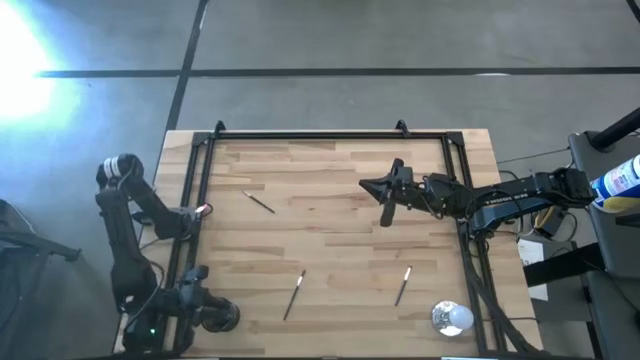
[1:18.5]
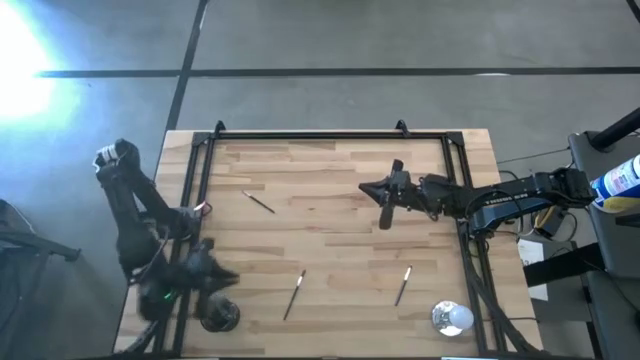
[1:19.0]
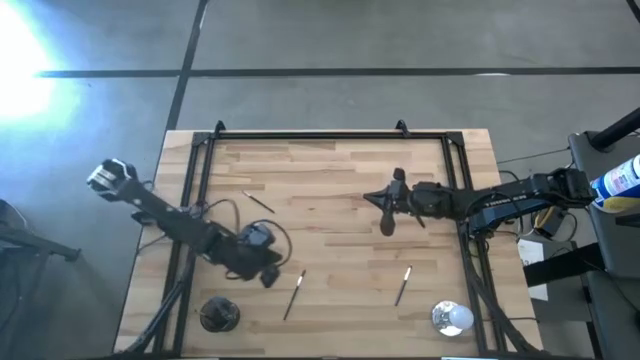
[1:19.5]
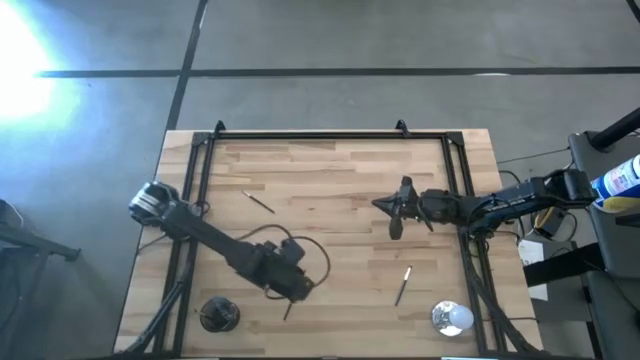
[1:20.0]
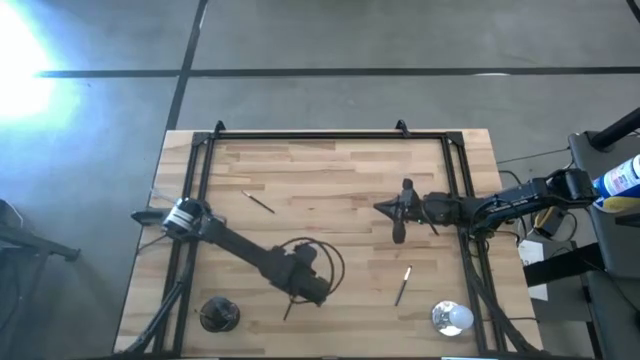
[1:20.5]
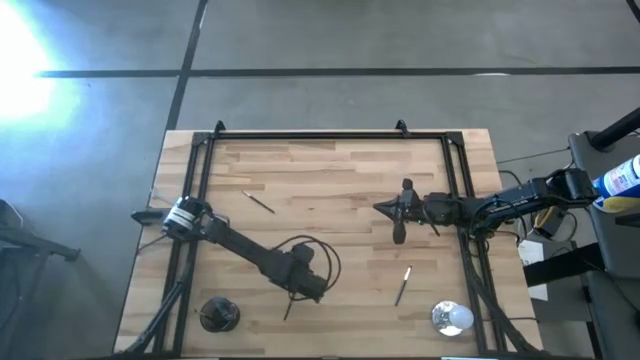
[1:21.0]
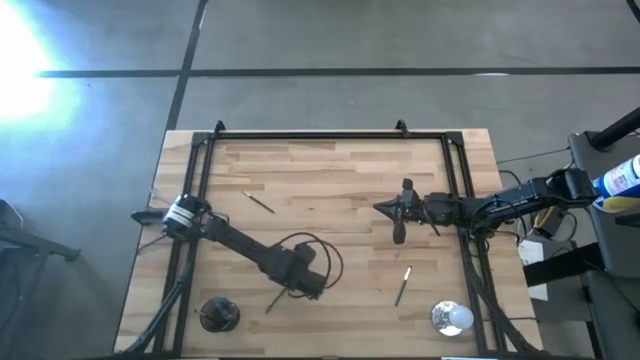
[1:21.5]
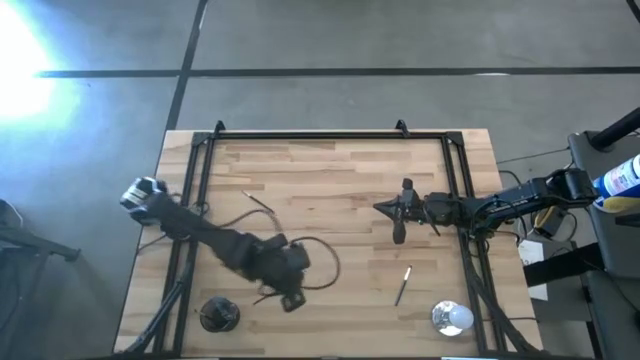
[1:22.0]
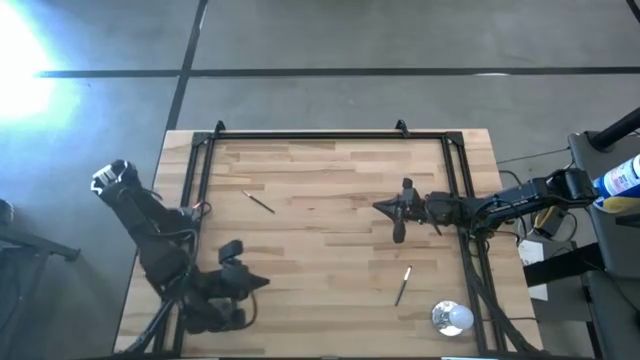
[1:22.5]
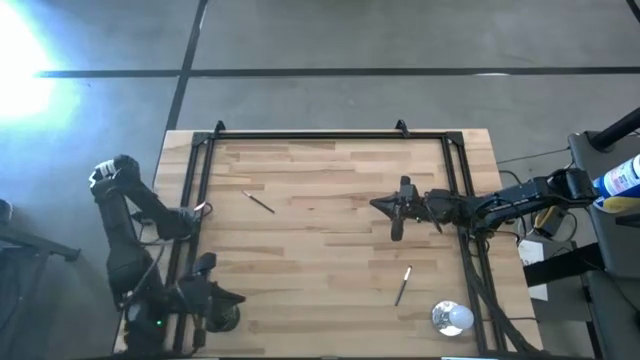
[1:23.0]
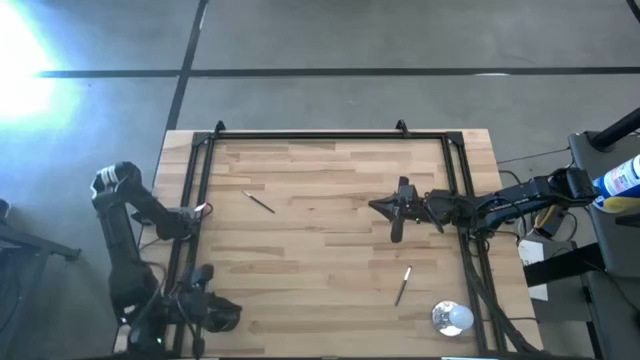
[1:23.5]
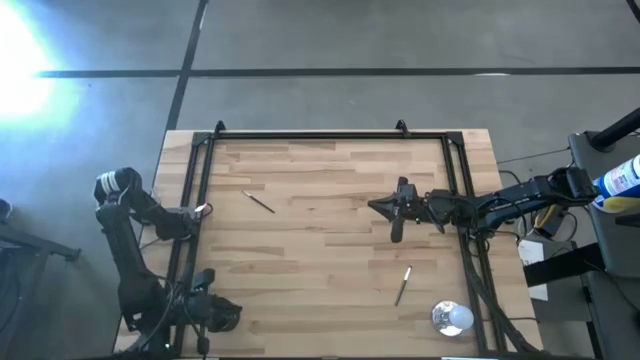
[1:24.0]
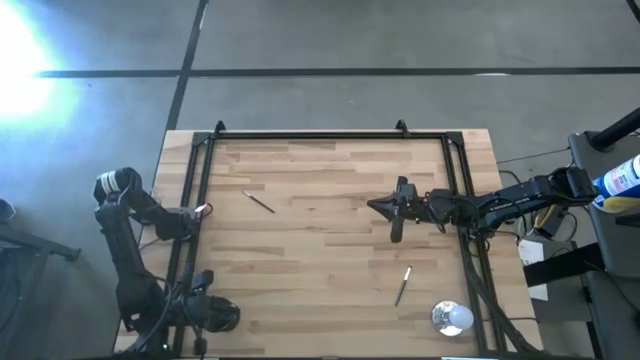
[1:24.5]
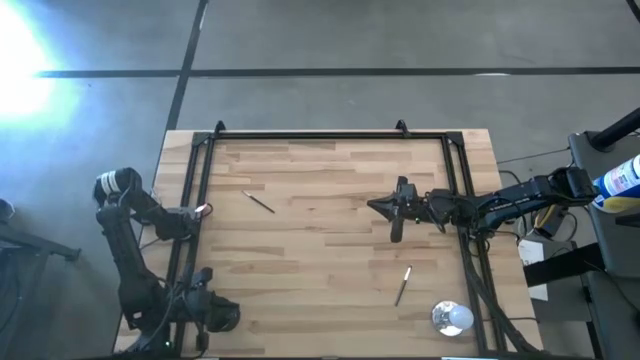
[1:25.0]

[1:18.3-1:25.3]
Task: Pick & Place Makeup Brushes
Put the black brow brush into the makeup holder

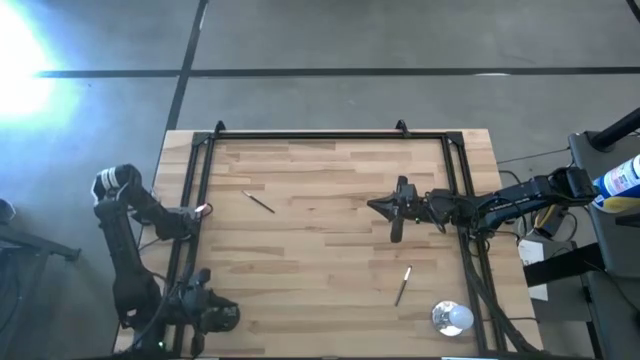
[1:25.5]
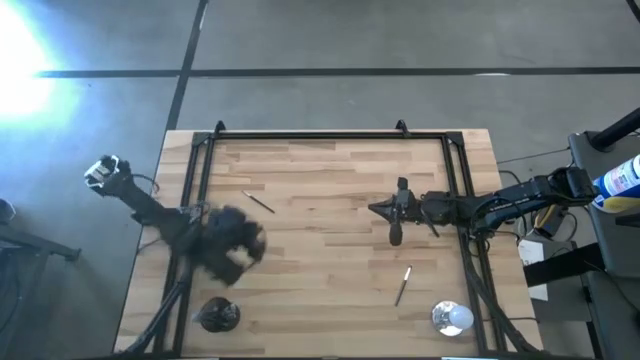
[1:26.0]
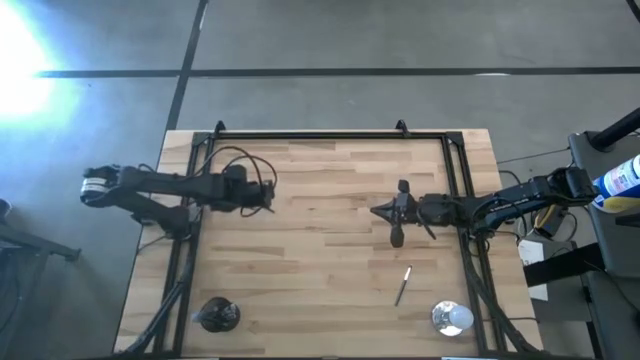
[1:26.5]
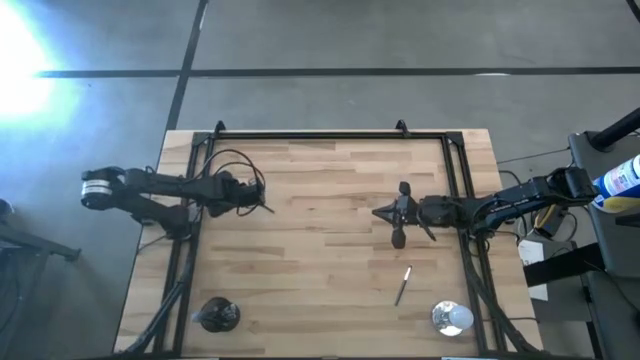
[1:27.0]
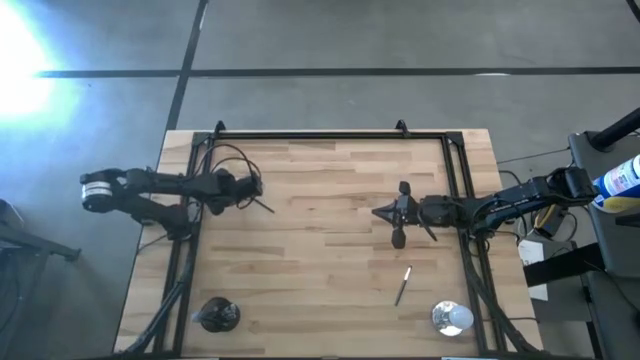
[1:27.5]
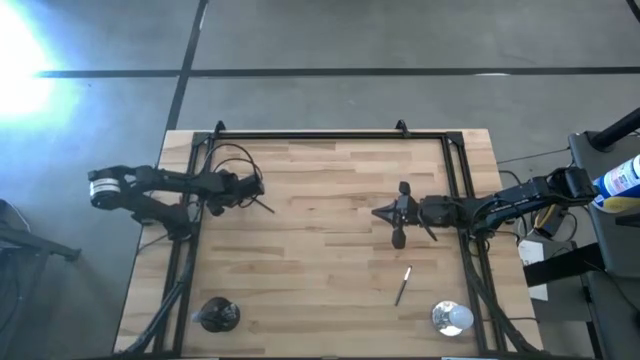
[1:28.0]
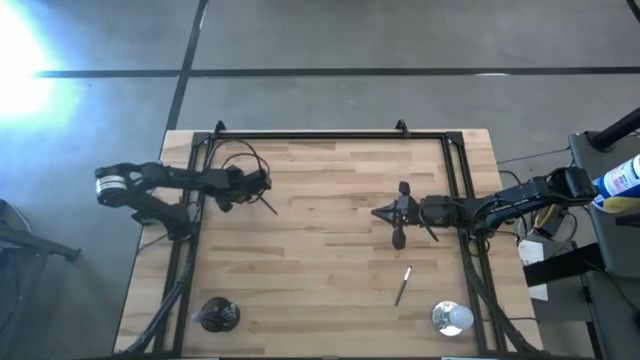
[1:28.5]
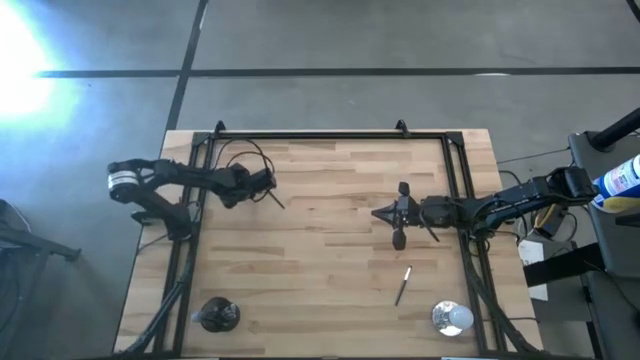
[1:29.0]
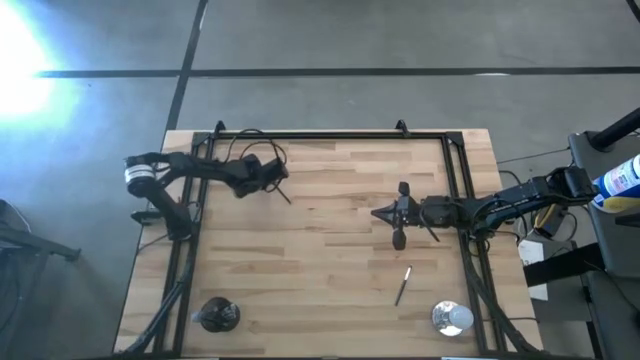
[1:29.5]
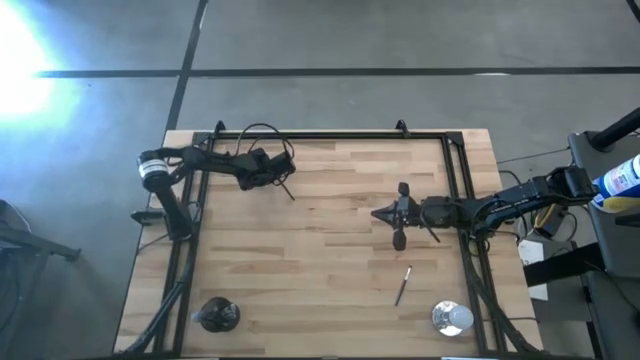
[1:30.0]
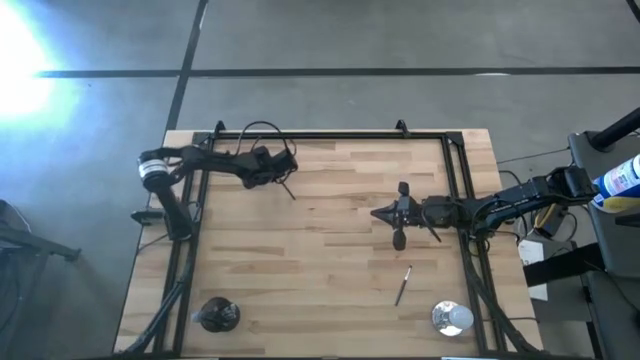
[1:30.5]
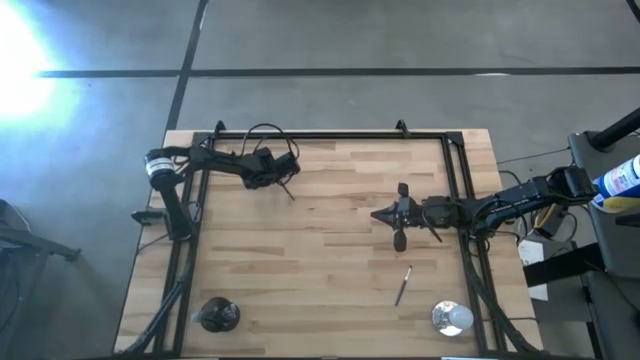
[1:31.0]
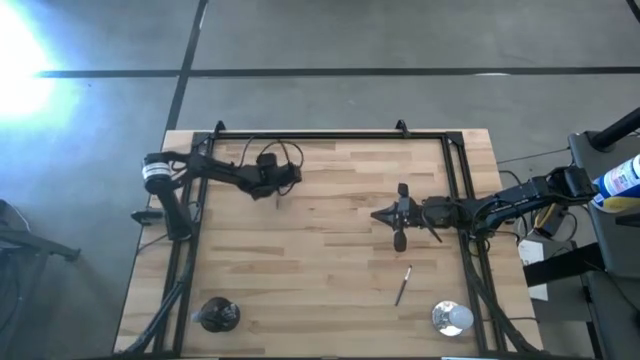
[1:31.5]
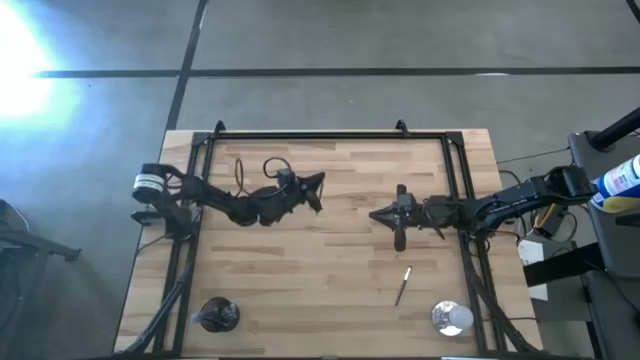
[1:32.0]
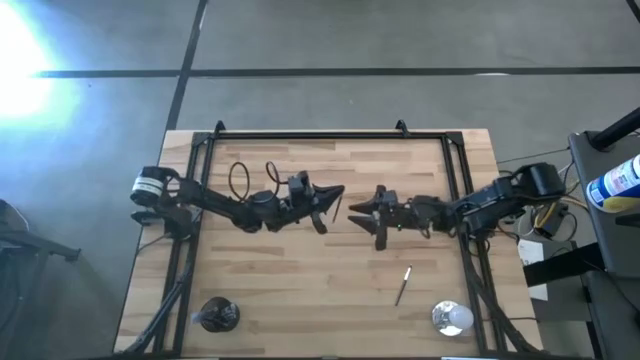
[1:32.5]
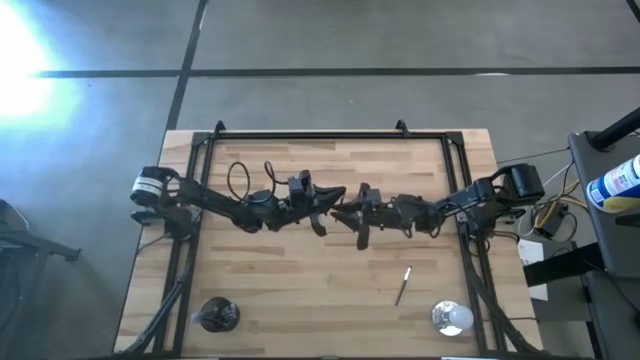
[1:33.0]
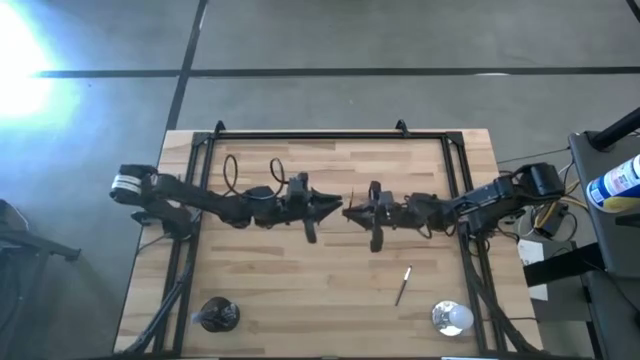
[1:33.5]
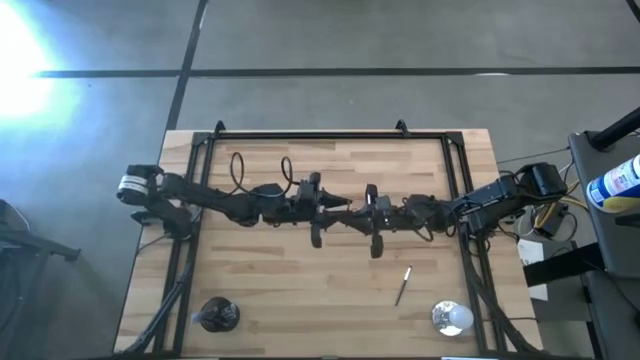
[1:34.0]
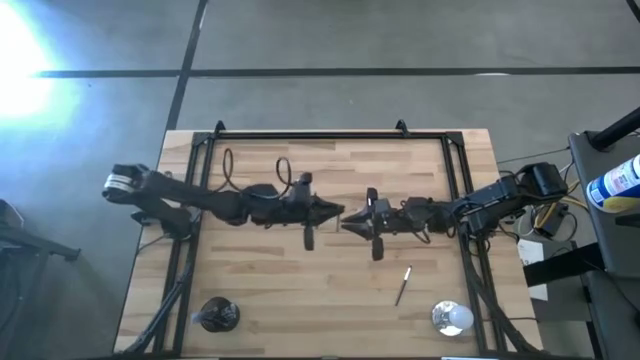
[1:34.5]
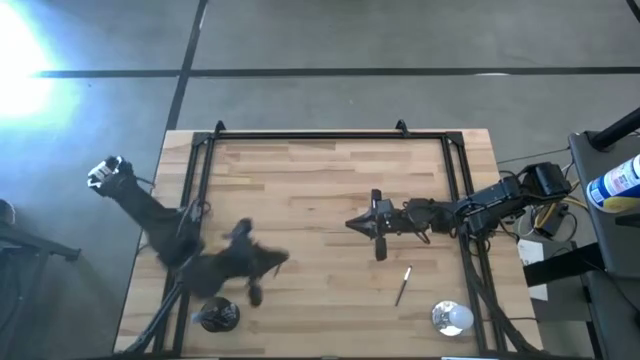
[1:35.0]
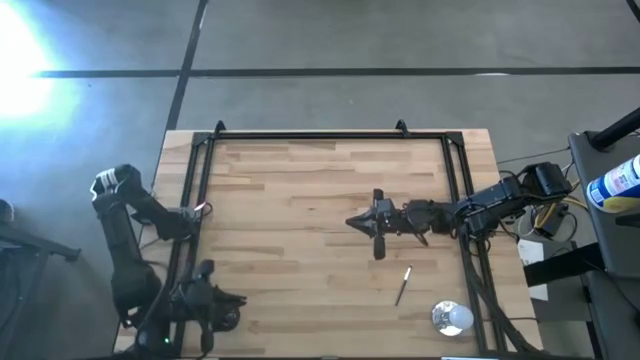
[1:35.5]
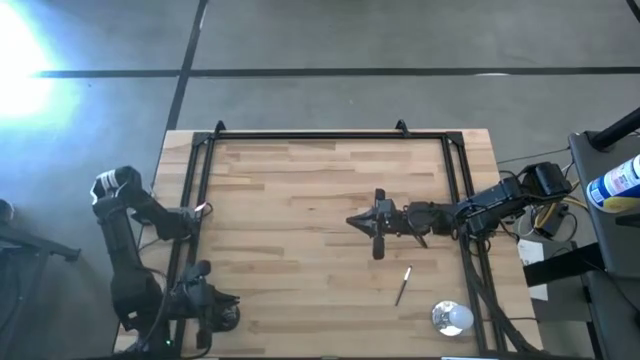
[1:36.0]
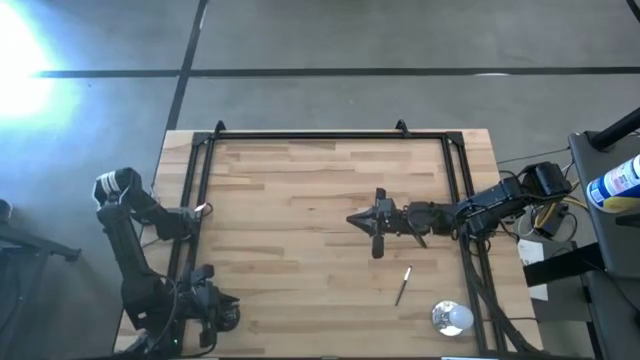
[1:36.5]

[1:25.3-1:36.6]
Put the black eyeshadow brush into the makeup holder

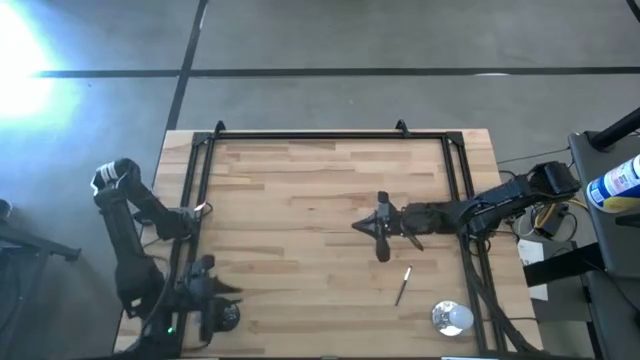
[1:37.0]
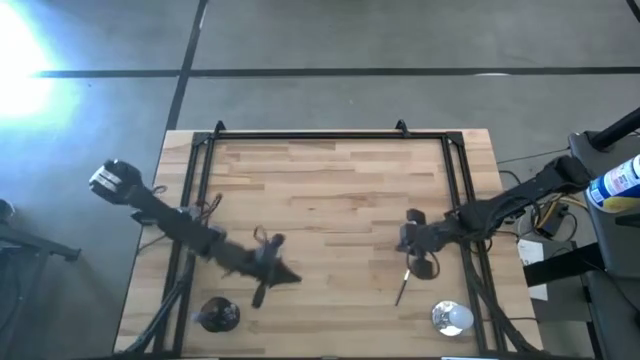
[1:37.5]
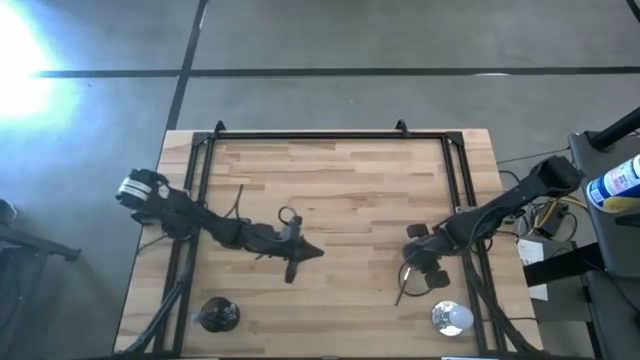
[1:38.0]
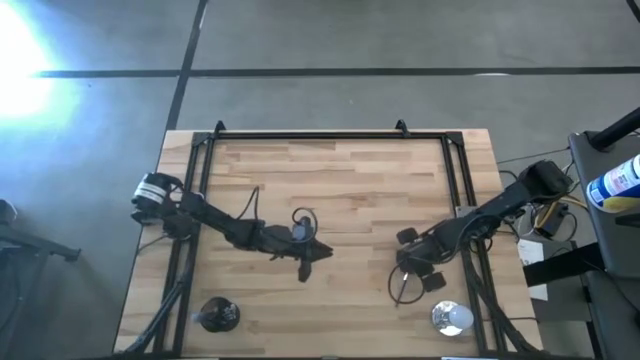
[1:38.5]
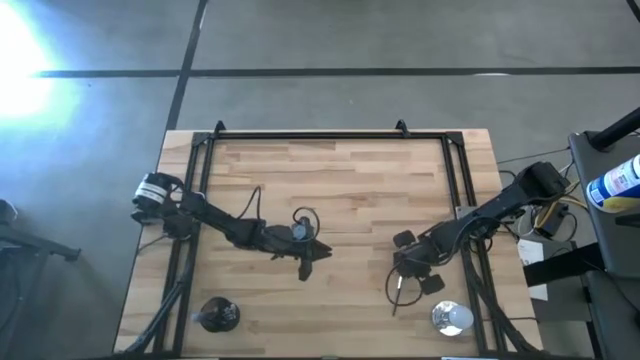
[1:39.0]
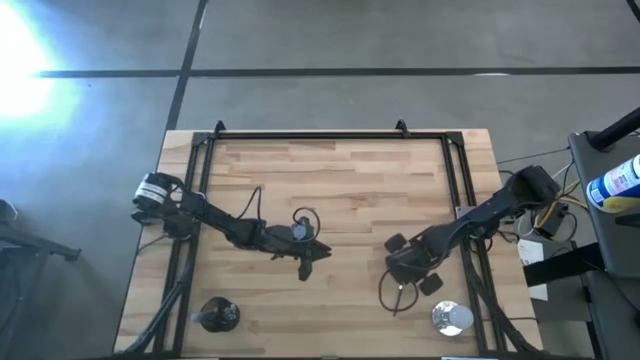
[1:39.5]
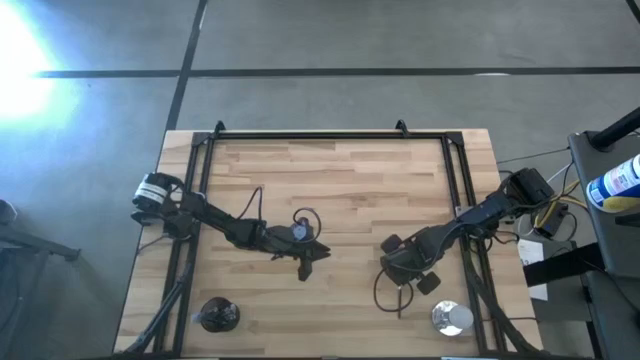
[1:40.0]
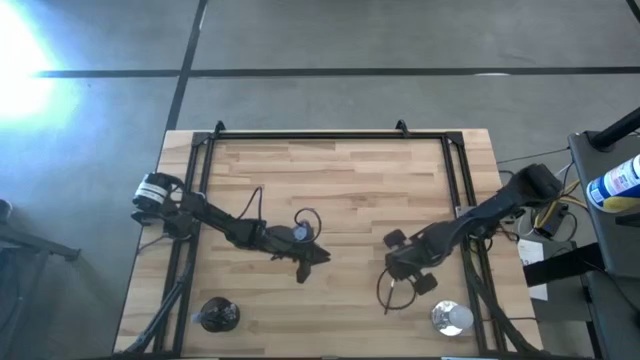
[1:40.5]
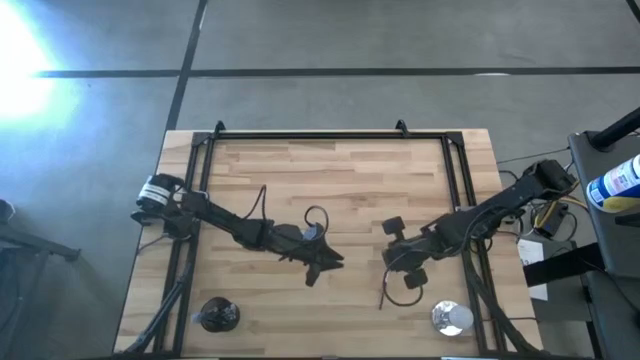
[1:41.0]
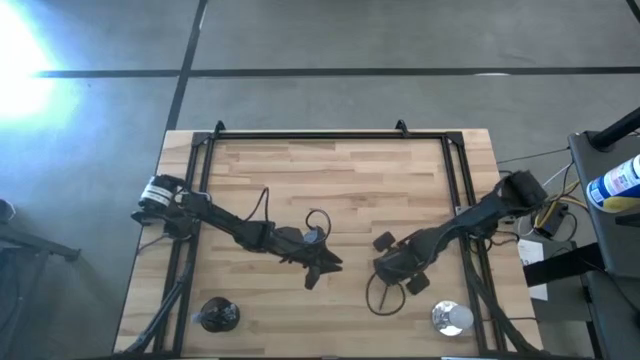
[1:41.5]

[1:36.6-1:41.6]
Put the black eyeshadow brush into the makeup holder
